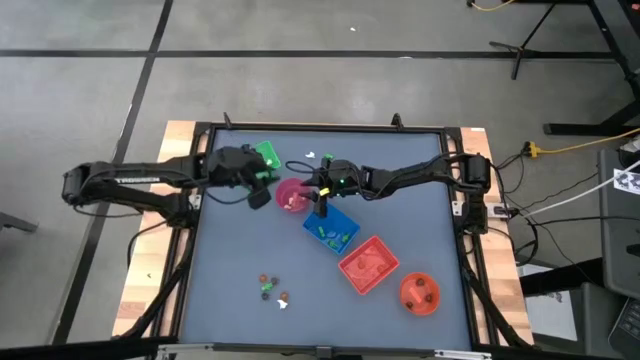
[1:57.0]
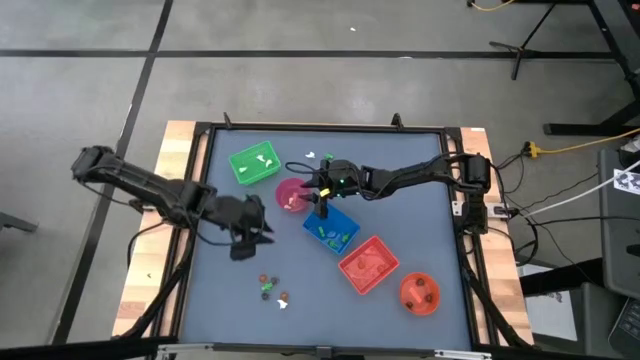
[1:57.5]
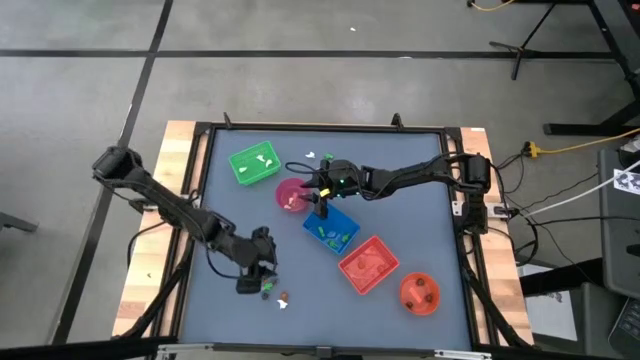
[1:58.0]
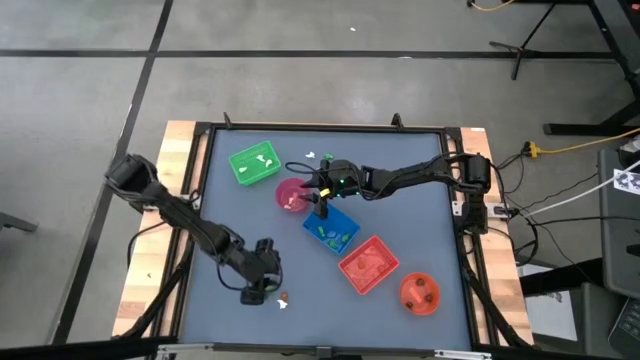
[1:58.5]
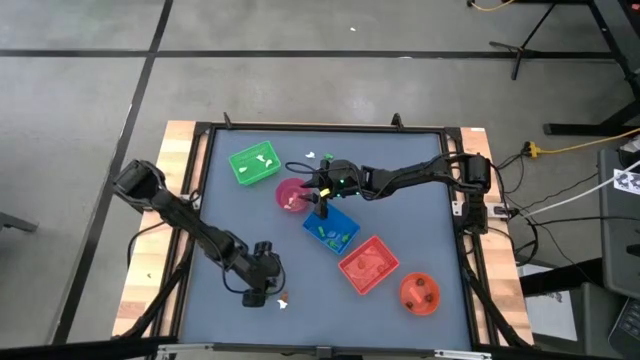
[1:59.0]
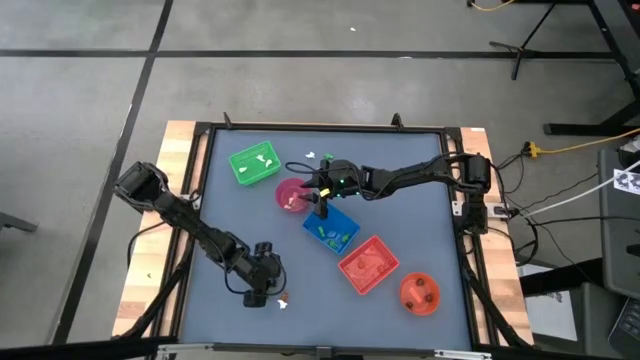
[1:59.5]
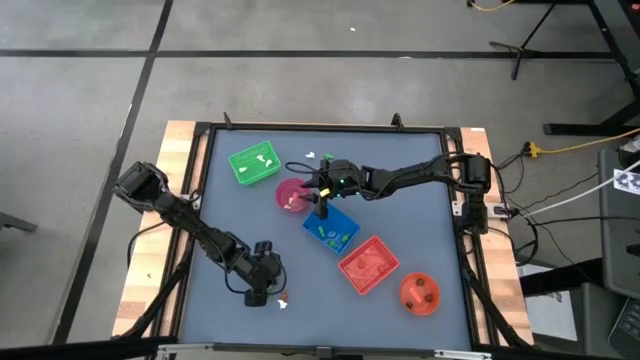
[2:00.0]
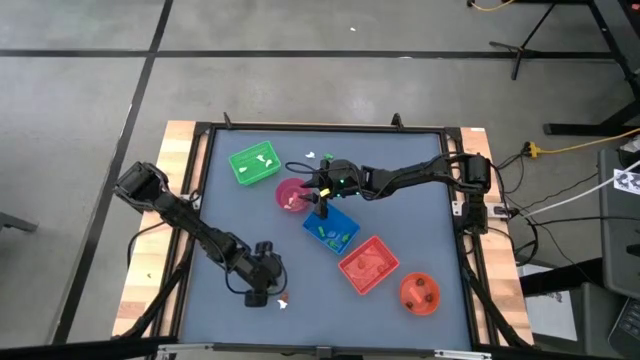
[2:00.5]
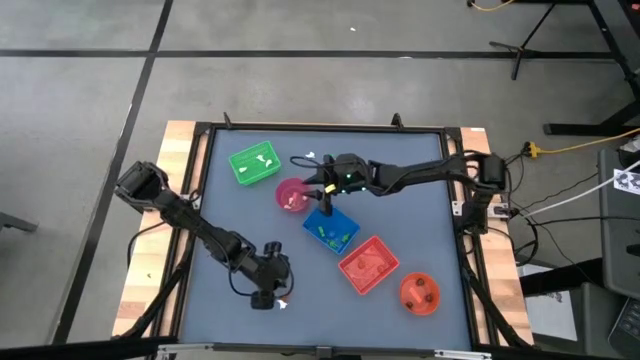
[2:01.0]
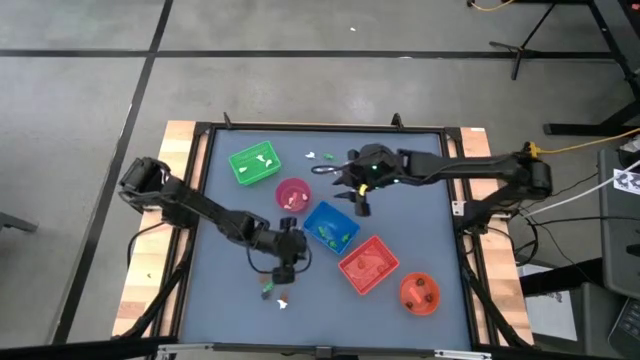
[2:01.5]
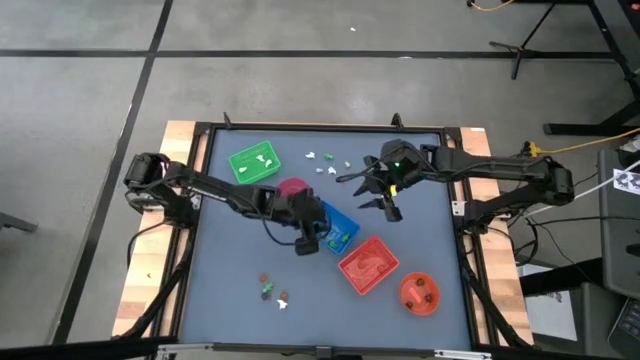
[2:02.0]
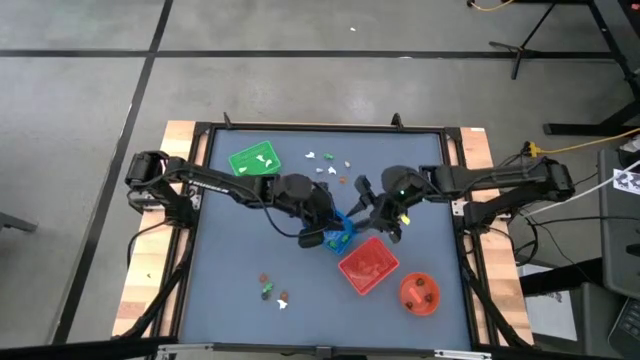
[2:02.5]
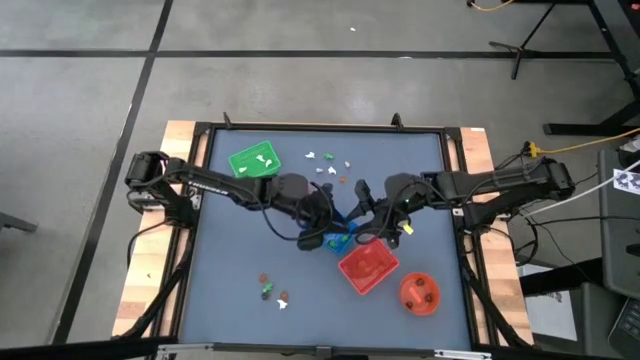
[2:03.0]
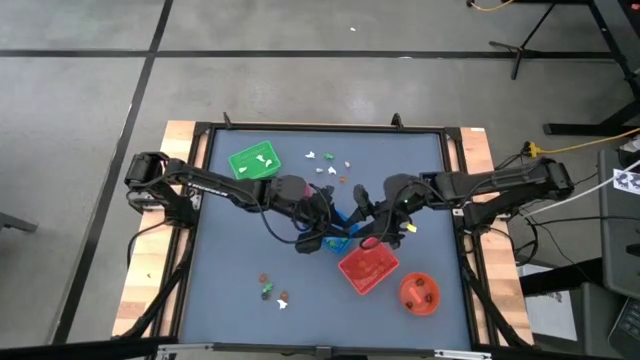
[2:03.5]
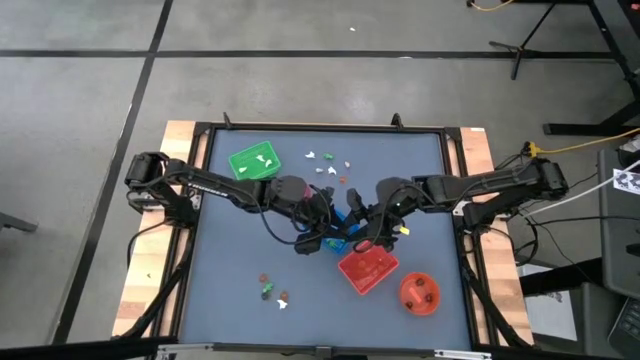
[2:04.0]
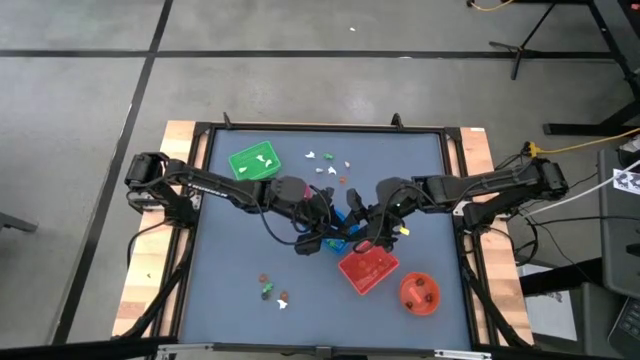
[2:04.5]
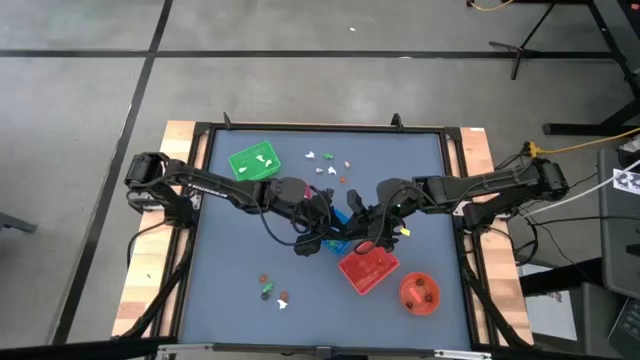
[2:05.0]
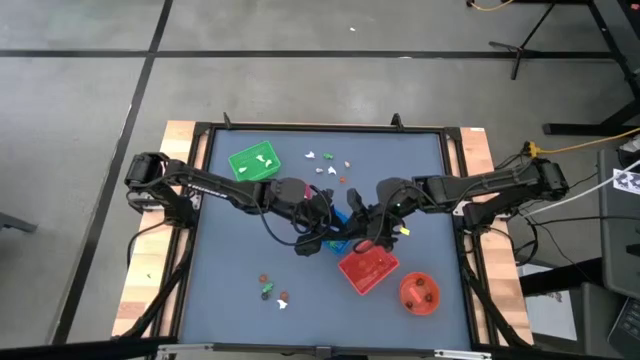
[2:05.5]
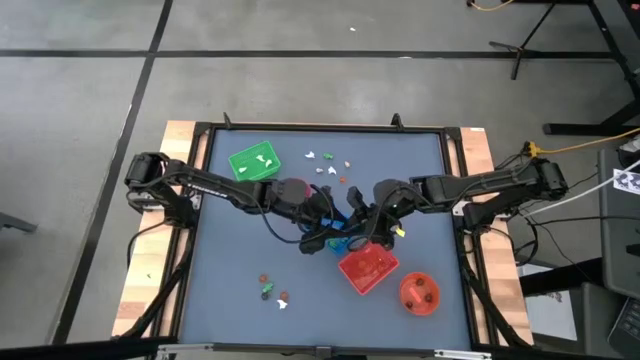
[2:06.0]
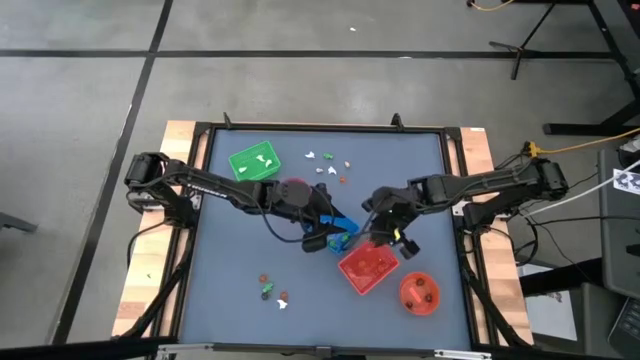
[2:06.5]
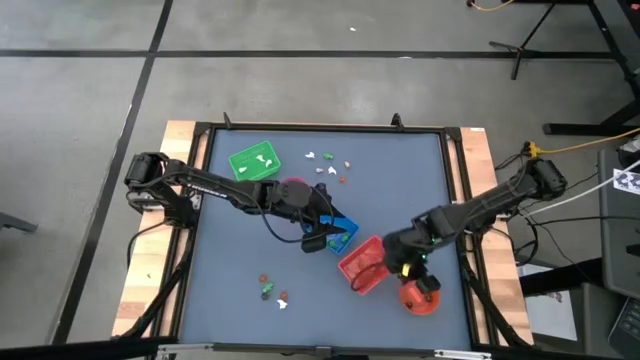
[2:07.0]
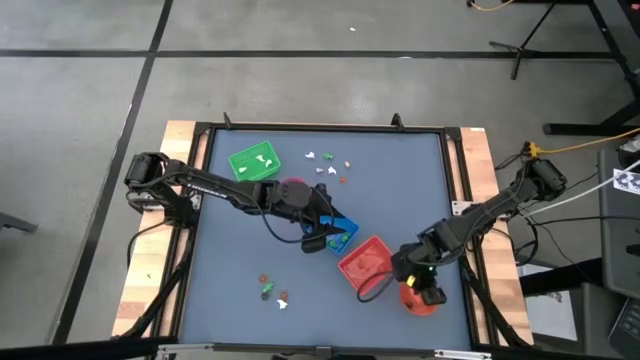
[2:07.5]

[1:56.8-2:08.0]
Task: Sort Halloween decoration
Put the black skull toy into the transparent orange bin

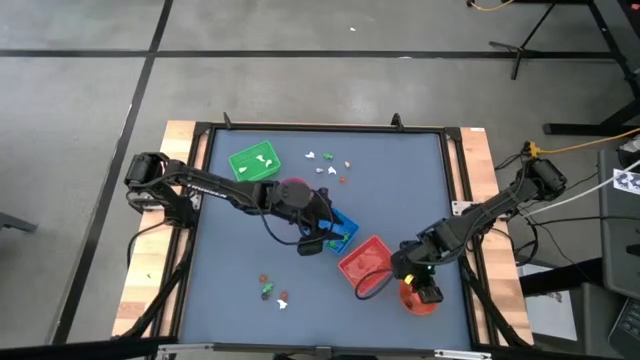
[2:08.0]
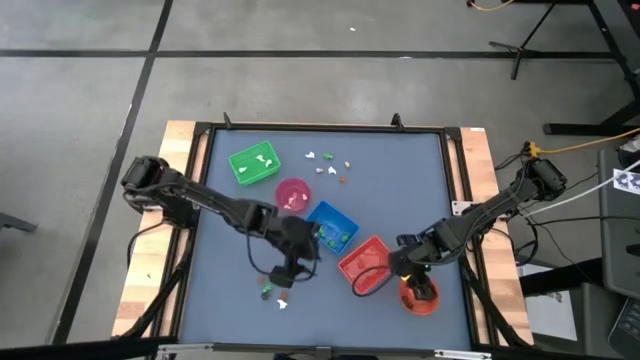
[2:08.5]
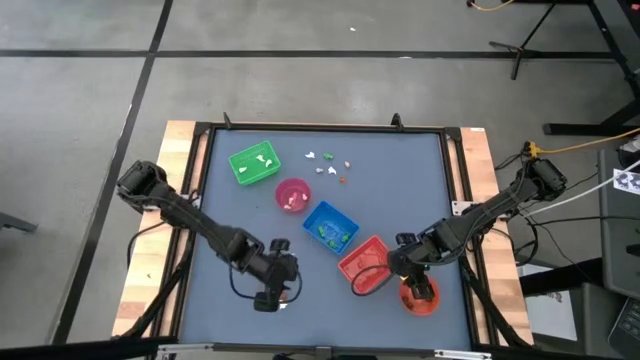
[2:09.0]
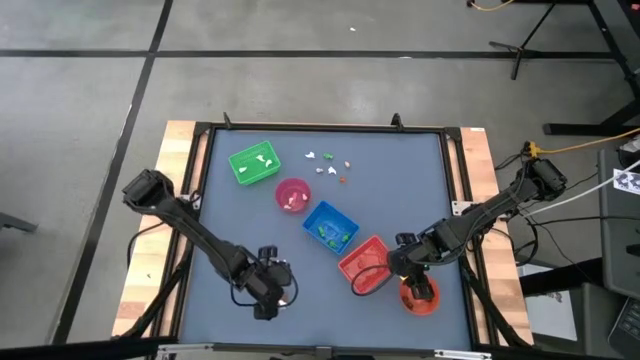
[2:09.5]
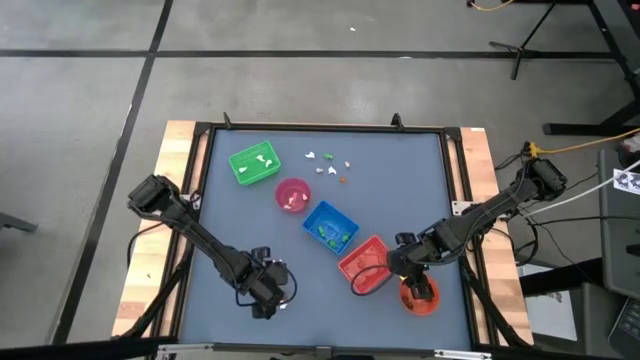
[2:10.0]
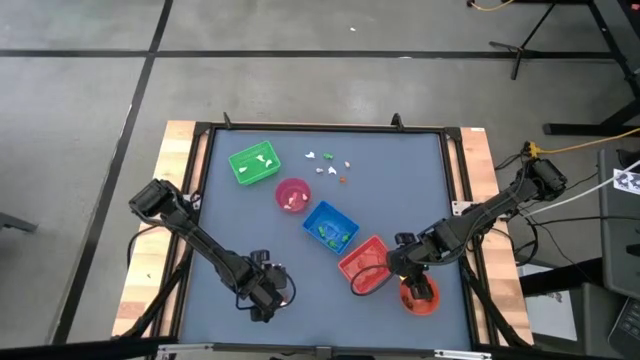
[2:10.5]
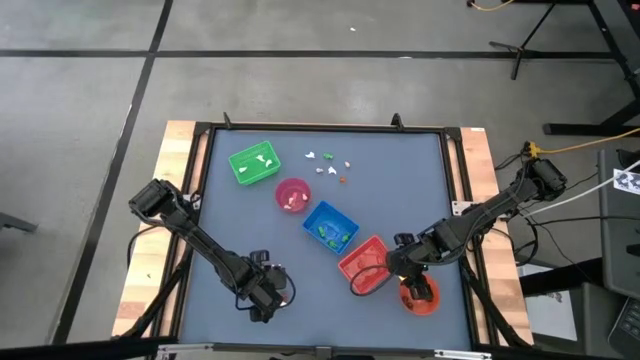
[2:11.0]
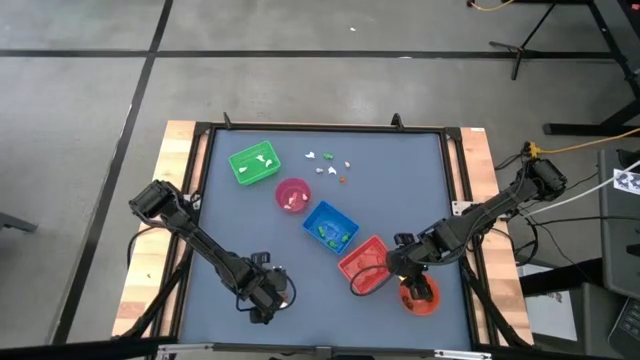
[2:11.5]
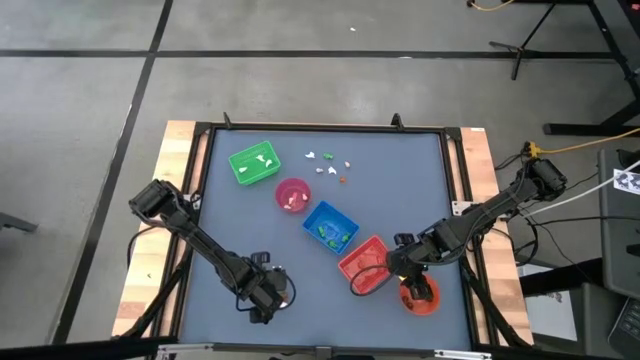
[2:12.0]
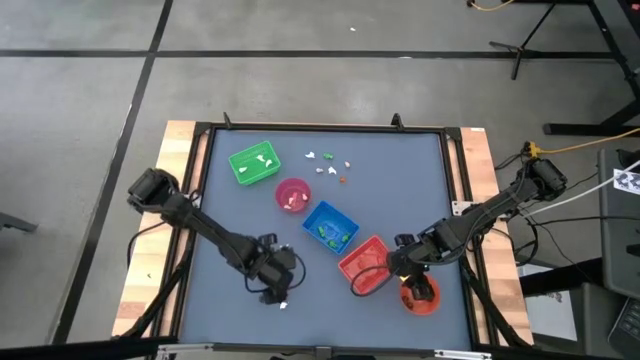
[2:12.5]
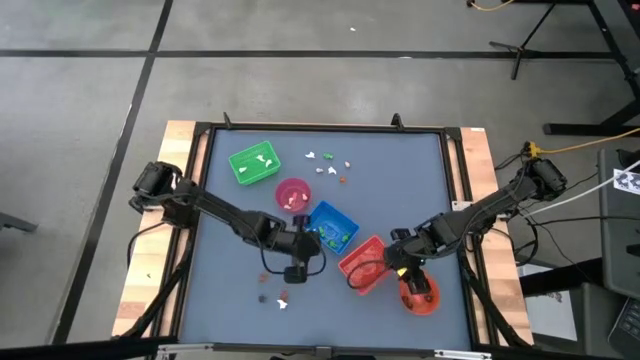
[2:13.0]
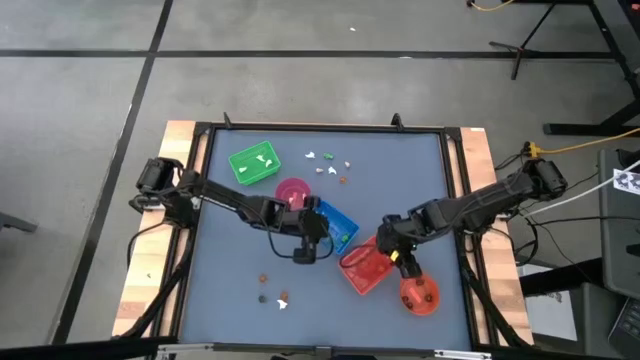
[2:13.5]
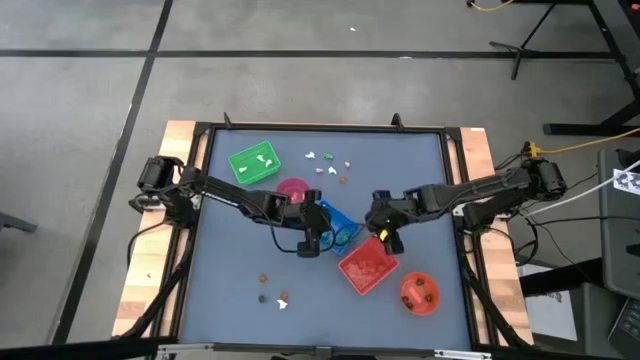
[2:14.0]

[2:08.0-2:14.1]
Put the green skeleton toy into the blue bin

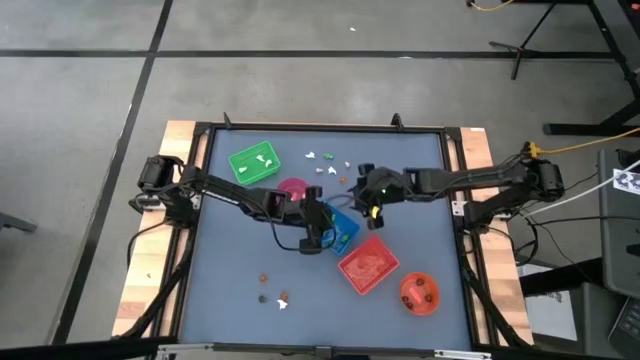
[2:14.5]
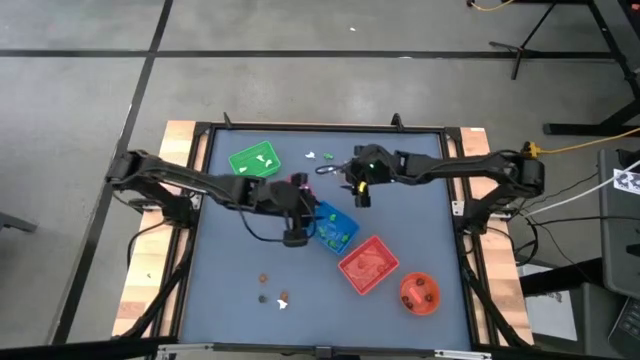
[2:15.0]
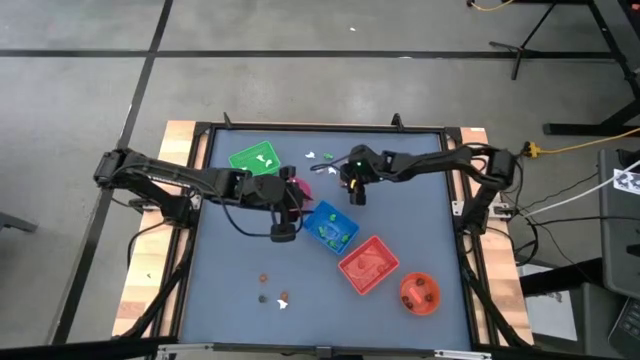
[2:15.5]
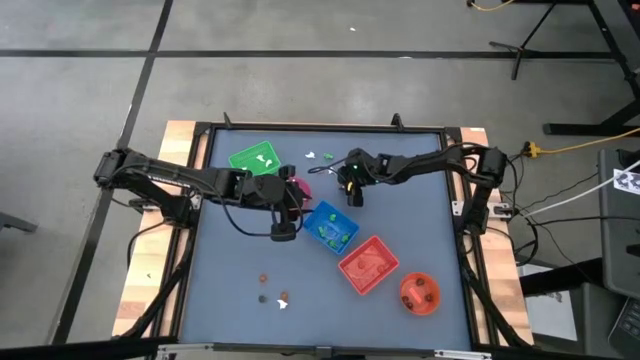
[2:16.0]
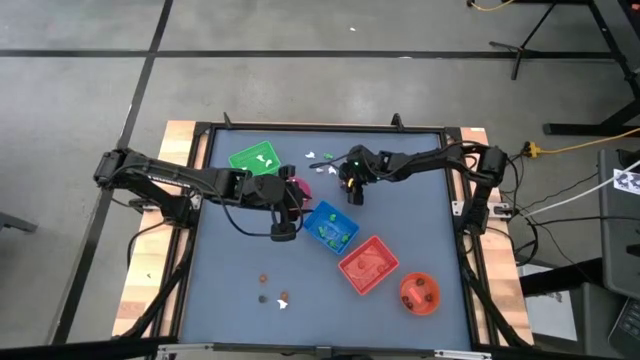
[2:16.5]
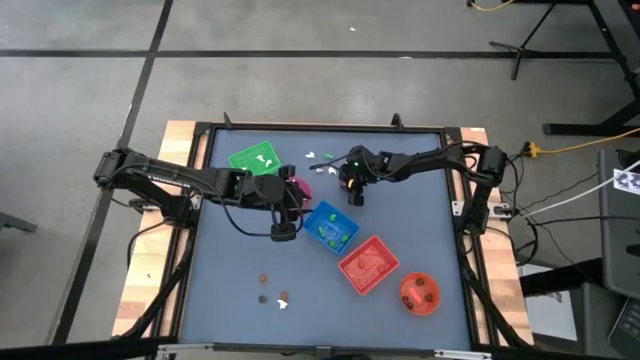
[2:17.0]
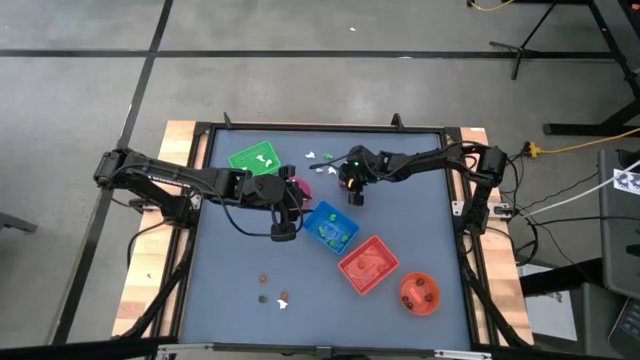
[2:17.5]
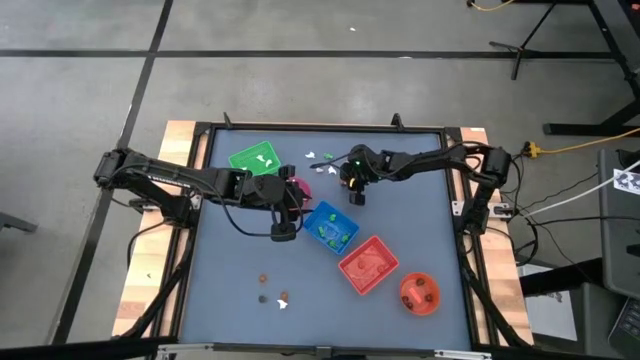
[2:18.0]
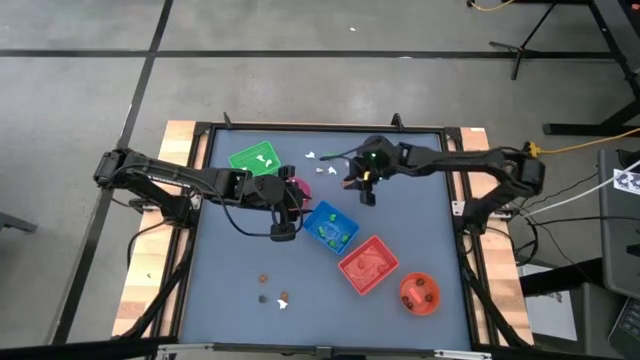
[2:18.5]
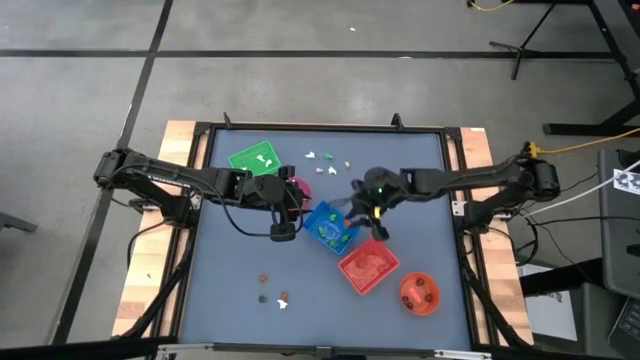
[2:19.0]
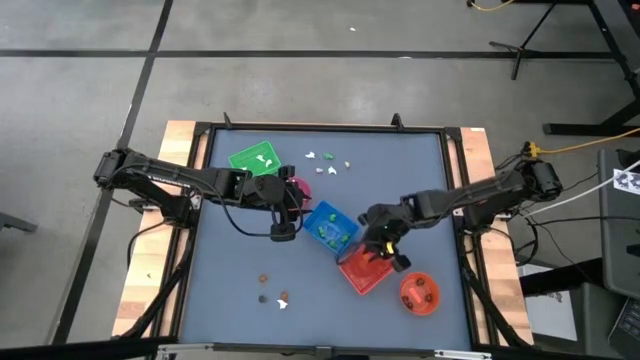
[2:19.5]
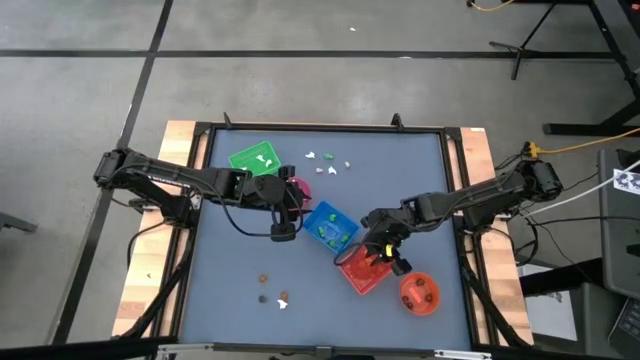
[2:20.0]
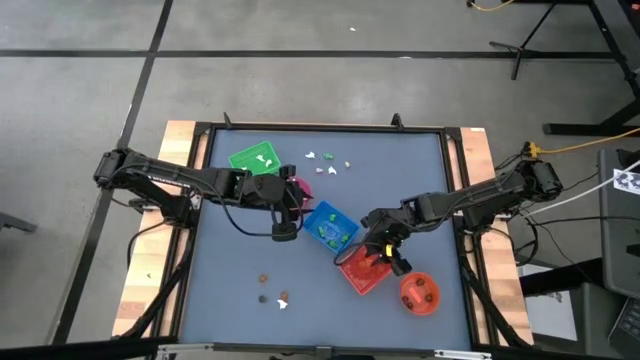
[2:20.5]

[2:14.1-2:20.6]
Put the orange pumpkin toy into the orange bin
